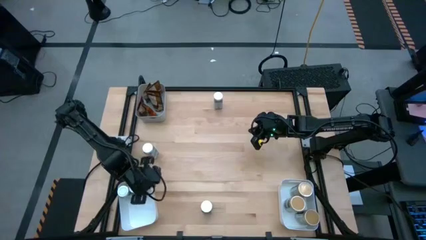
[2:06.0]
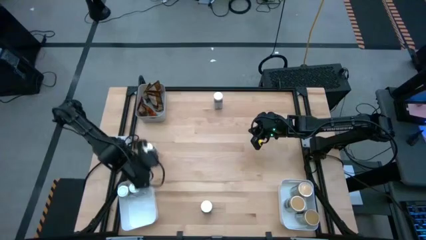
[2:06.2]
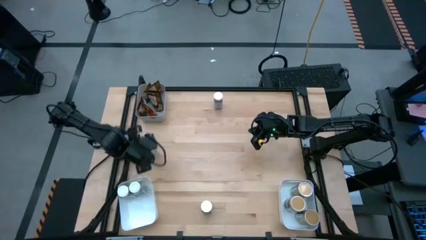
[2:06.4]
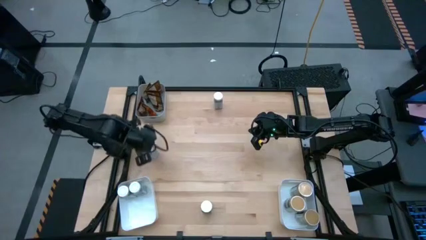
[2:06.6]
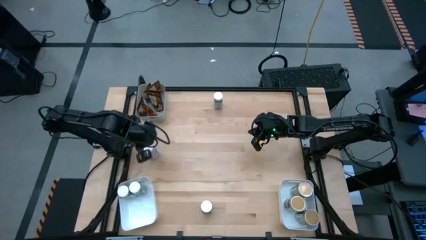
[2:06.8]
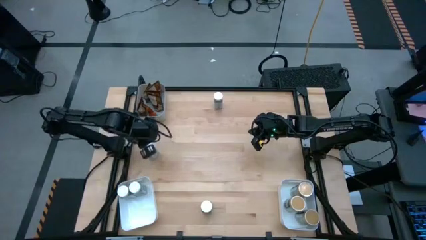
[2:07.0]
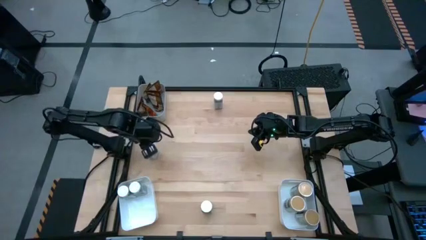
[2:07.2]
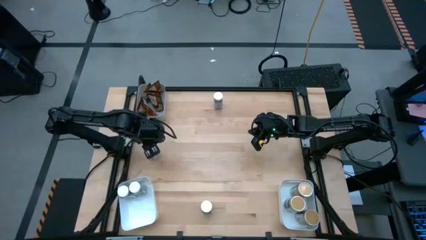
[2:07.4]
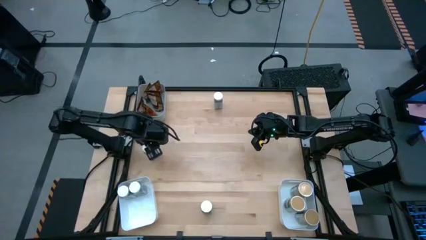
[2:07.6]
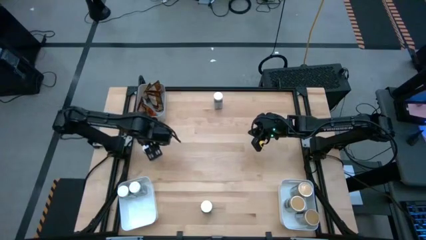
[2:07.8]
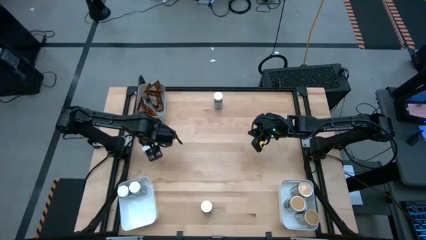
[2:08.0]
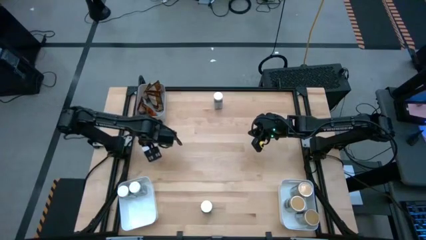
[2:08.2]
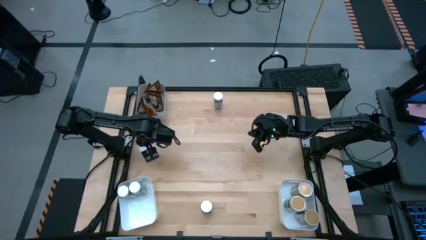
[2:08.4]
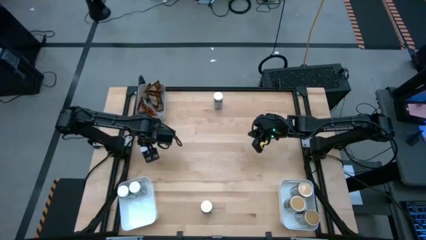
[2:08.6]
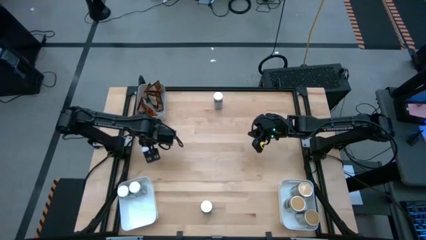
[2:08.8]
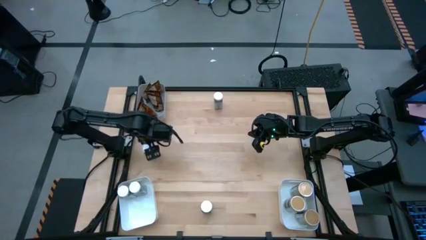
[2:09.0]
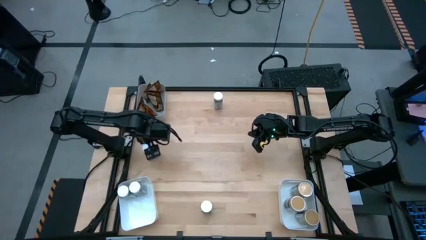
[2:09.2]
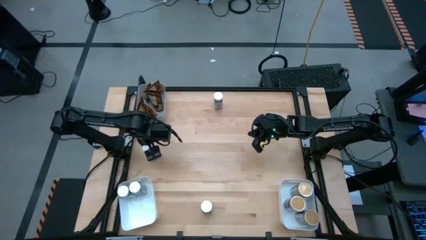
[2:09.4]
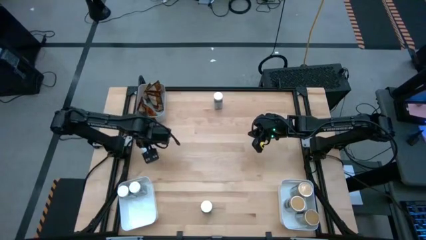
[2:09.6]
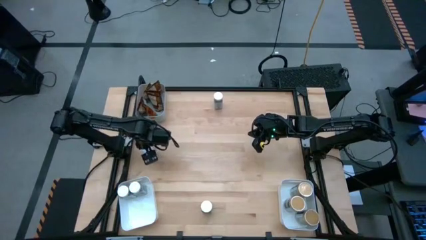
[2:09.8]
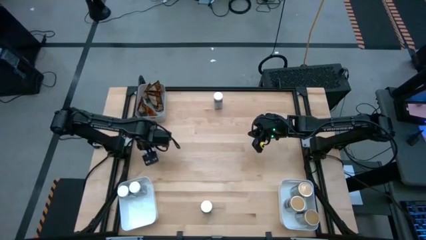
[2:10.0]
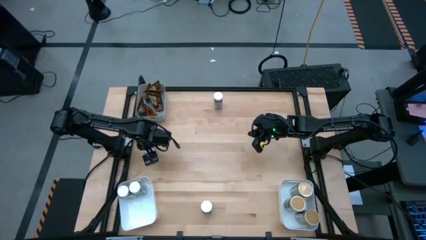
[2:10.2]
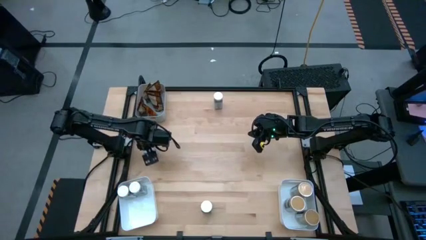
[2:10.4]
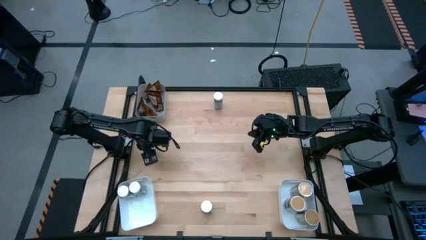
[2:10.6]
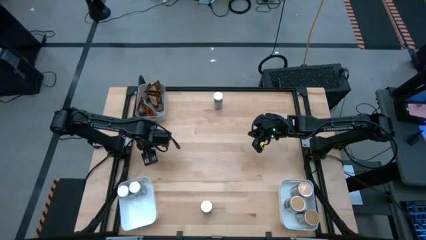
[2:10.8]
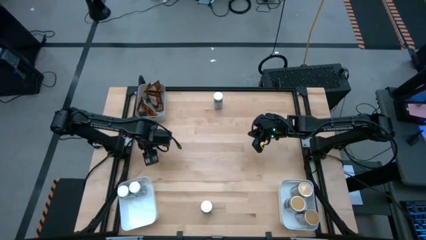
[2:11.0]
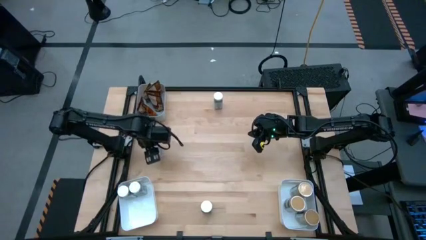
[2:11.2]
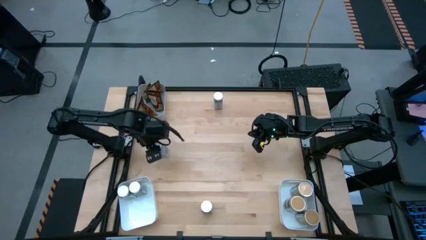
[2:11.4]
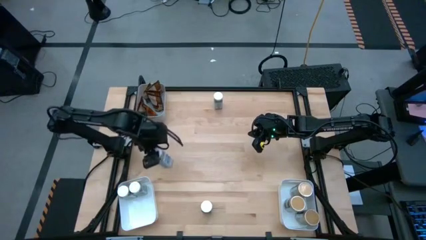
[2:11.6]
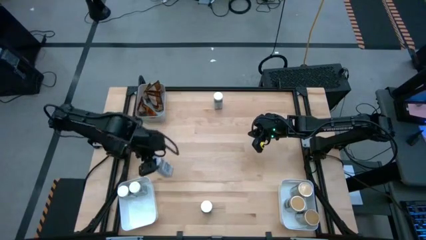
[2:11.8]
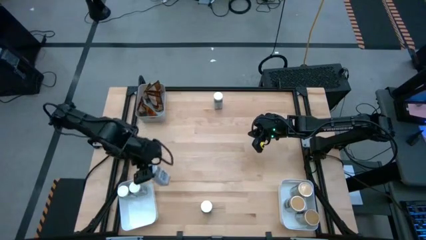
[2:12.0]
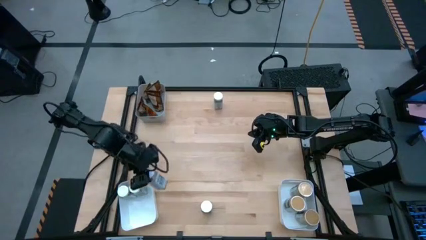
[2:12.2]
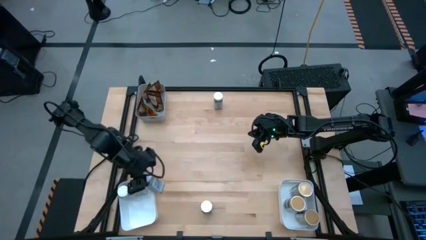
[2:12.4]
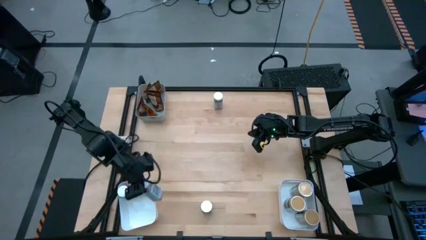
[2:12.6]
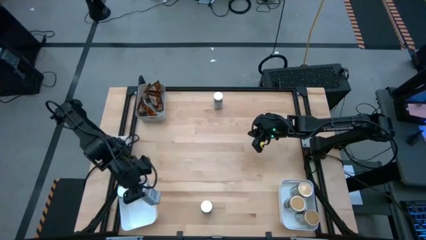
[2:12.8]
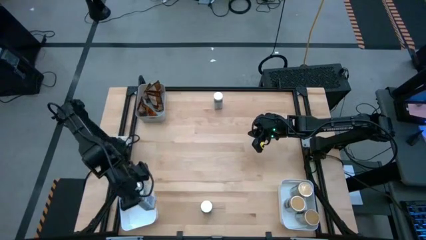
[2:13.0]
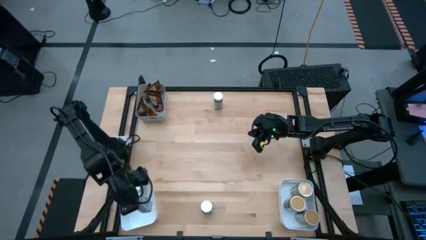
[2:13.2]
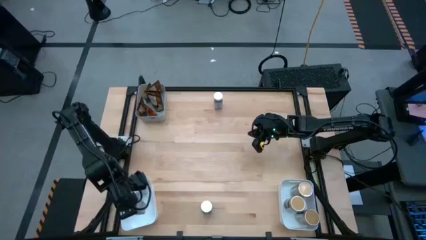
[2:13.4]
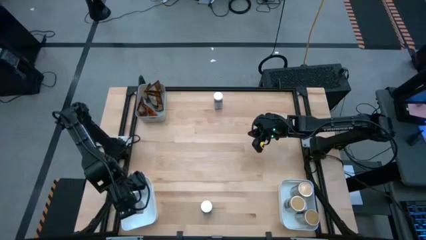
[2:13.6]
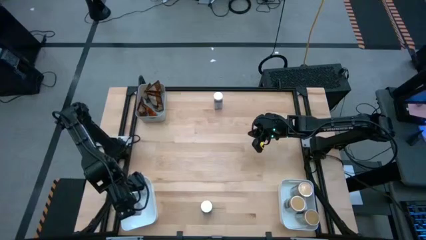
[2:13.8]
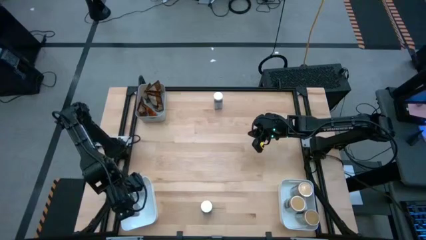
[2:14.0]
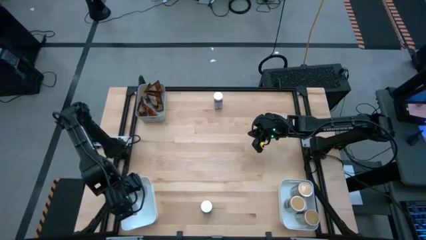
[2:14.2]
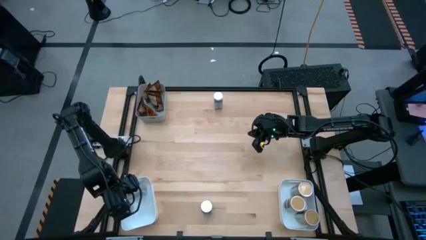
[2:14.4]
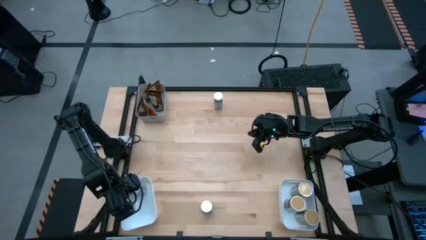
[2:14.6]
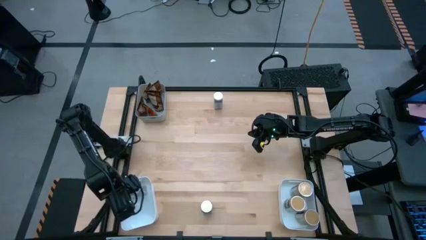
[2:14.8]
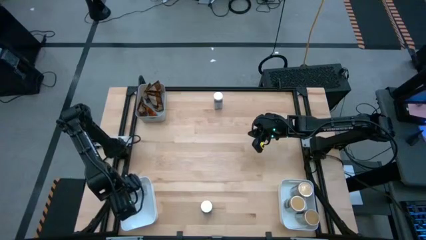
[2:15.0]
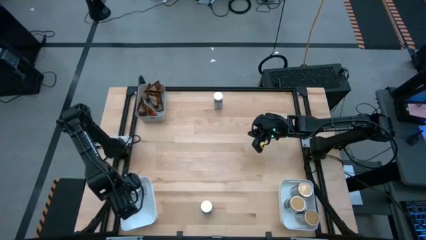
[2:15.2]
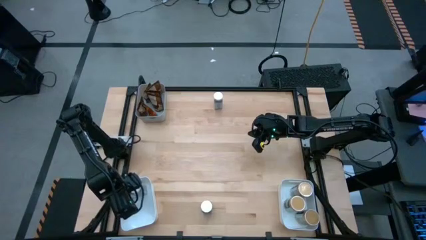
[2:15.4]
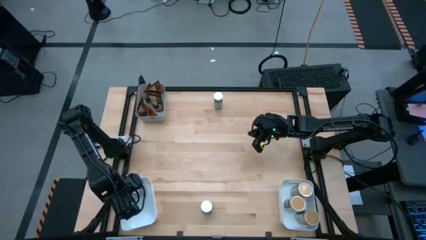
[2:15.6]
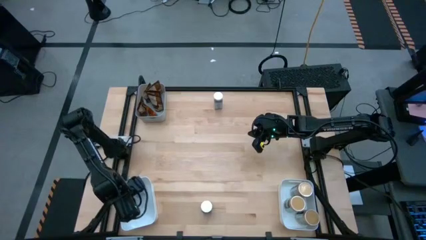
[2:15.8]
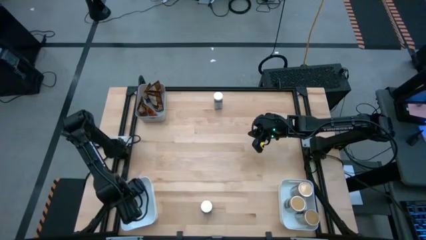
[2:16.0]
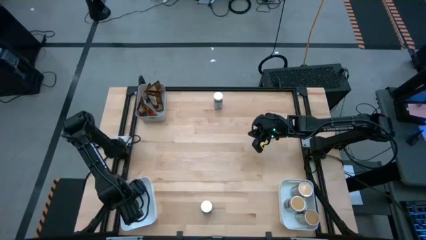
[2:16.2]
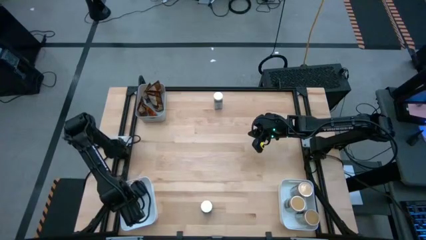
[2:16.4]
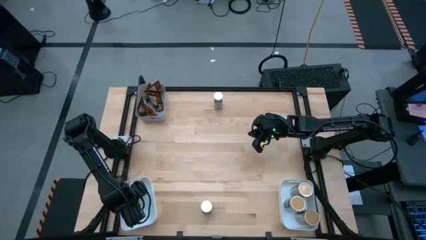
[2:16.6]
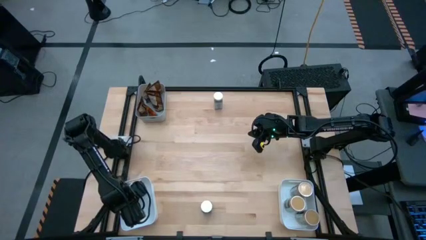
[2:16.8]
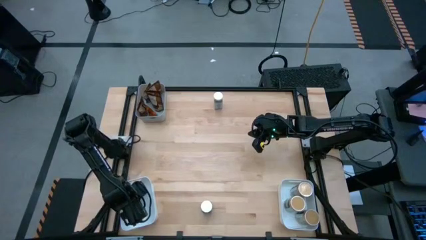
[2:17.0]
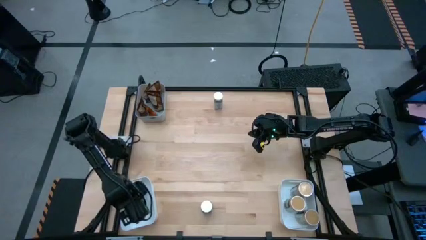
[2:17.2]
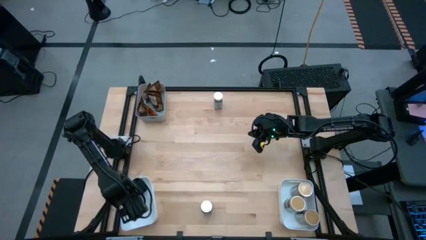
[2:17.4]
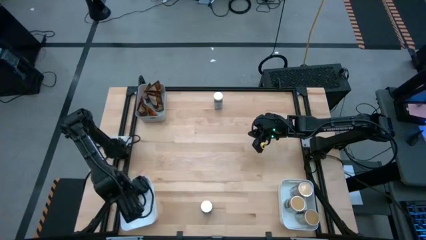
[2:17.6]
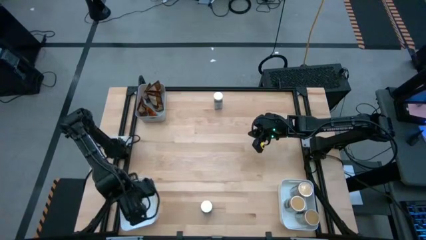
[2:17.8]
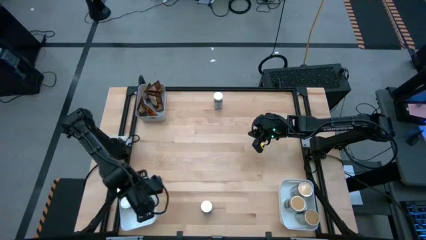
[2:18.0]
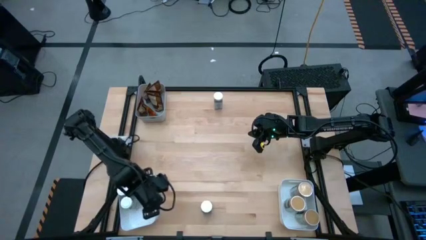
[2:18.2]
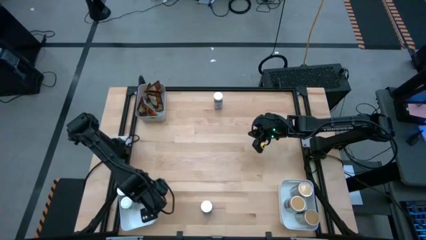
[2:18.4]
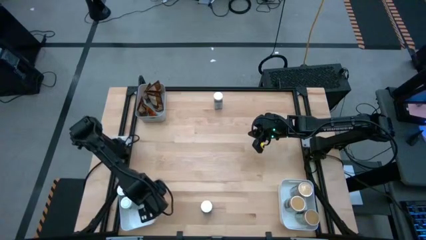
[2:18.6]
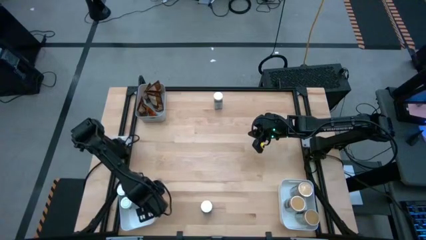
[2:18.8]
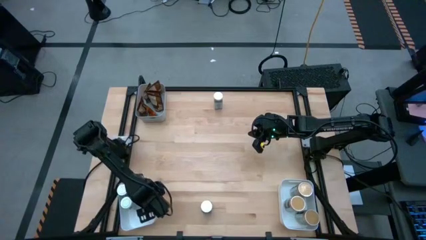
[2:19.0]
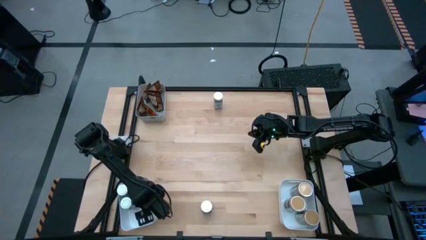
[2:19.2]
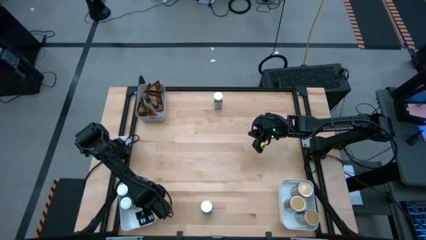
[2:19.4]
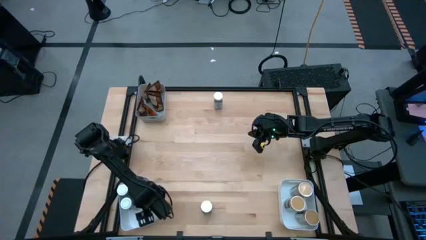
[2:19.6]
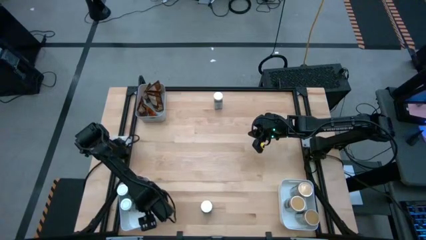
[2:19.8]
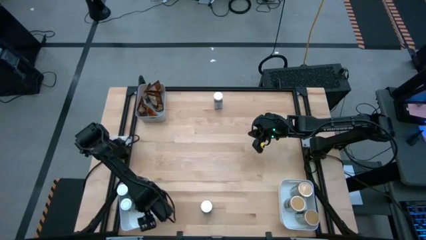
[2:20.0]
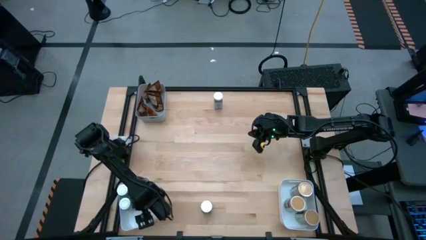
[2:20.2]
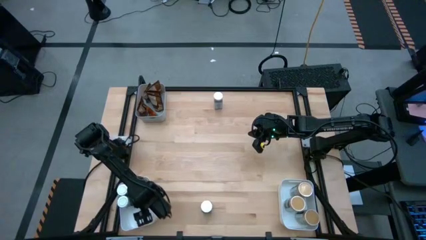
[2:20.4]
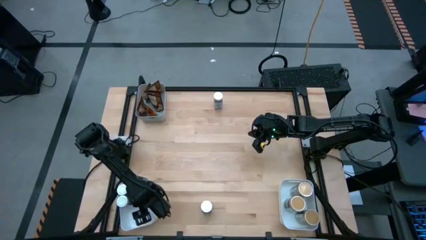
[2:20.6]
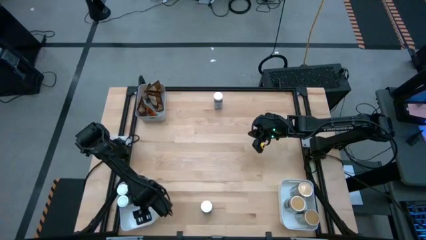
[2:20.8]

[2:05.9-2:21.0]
Task: Sort spices by type
Put the white seasoning bottle into the bottom left white bin

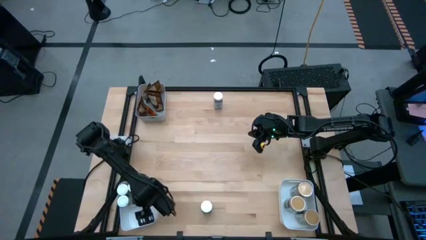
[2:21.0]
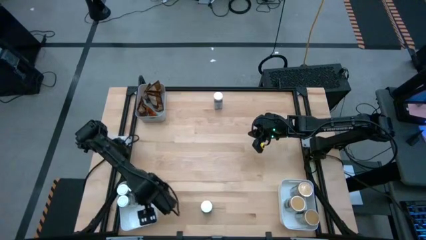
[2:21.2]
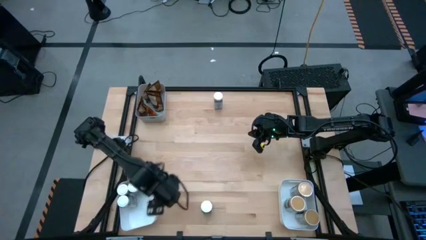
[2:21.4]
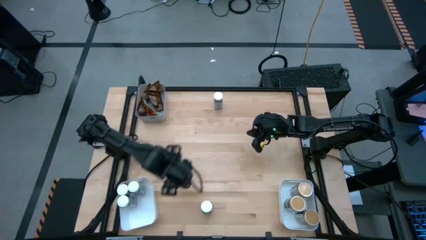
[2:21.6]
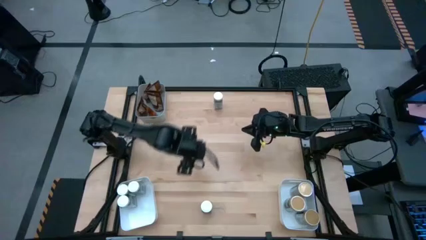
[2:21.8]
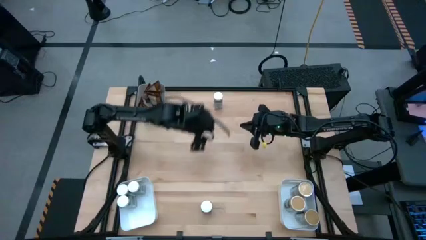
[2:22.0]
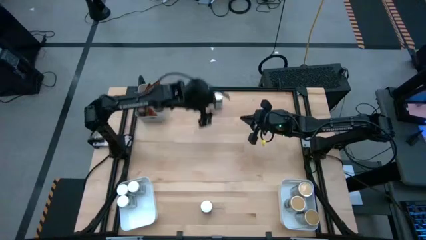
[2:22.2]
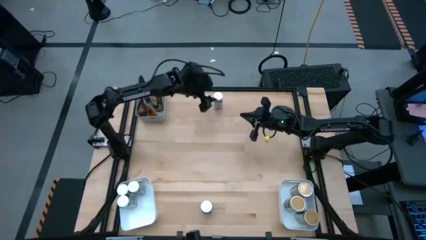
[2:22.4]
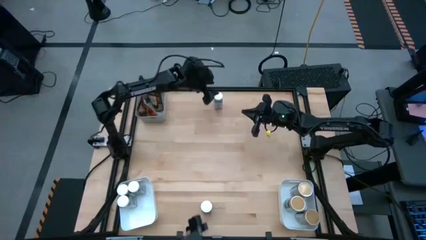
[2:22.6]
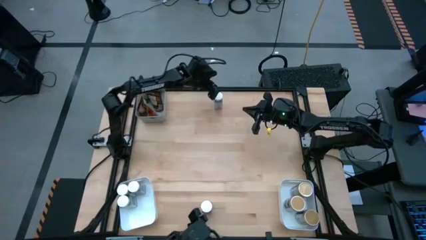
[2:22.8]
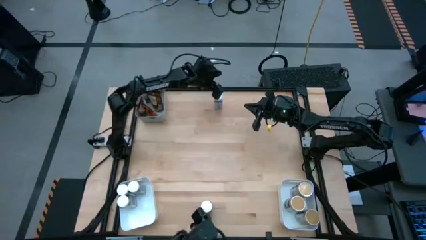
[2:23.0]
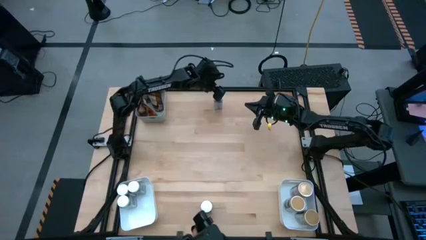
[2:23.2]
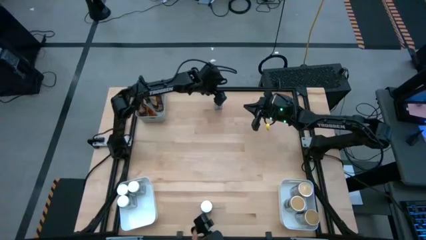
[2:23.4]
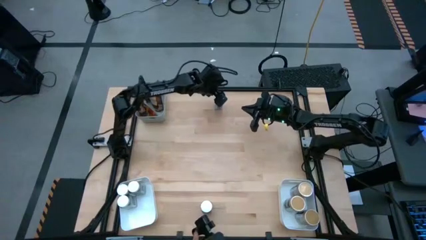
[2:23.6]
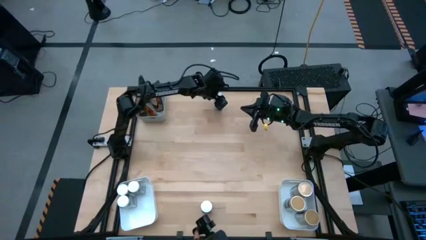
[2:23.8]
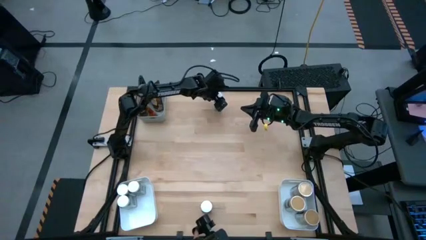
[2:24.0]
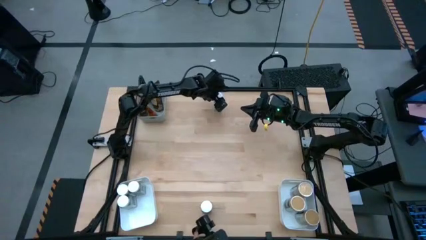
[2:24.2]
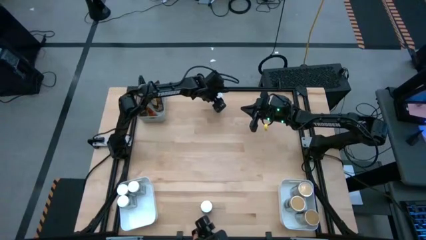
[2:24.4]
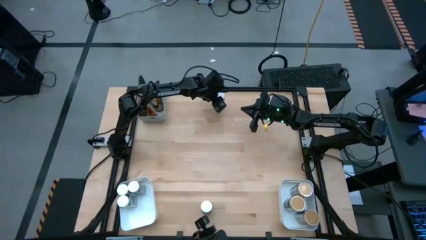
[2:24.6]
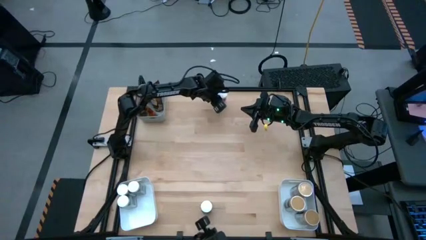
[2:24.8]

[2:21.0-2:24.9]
Put the white seasoning bottle into the bottom left white bin
